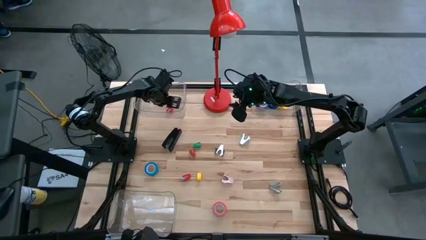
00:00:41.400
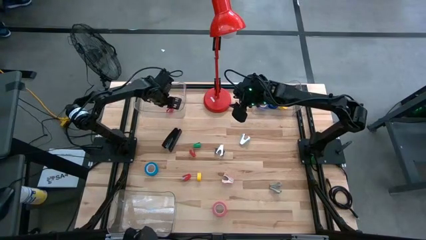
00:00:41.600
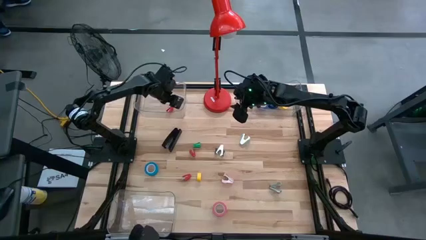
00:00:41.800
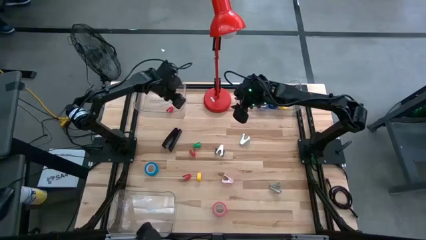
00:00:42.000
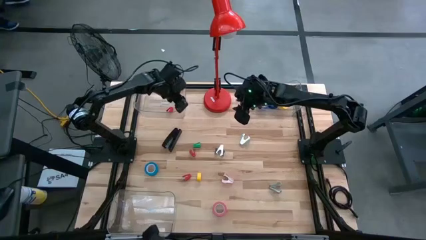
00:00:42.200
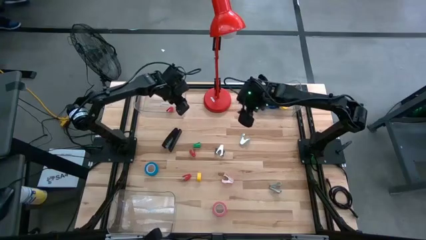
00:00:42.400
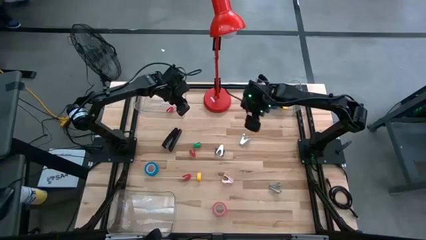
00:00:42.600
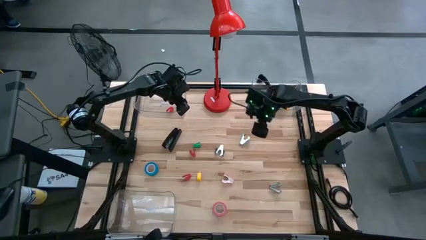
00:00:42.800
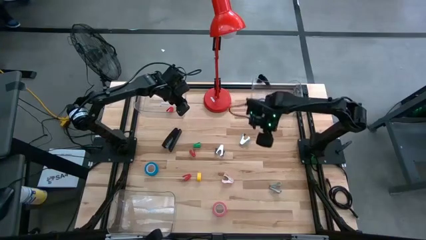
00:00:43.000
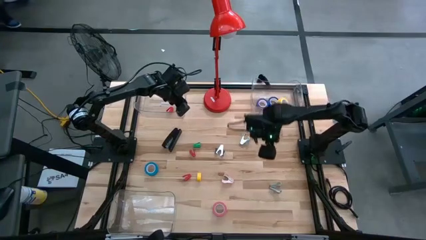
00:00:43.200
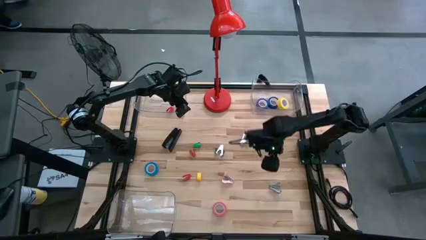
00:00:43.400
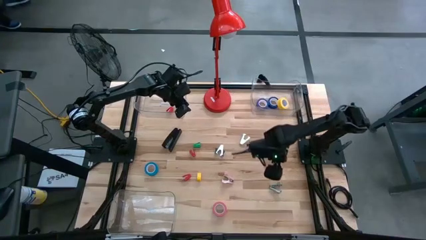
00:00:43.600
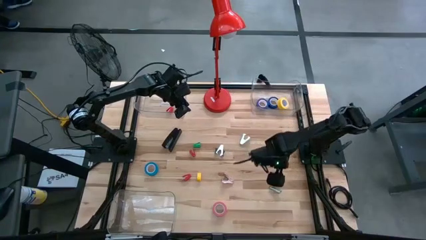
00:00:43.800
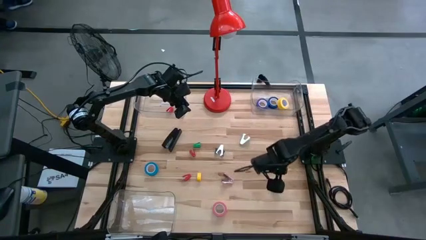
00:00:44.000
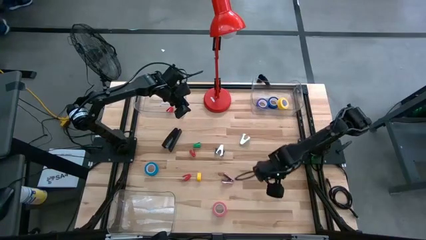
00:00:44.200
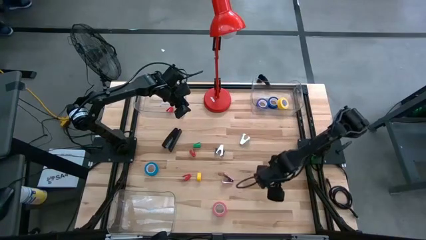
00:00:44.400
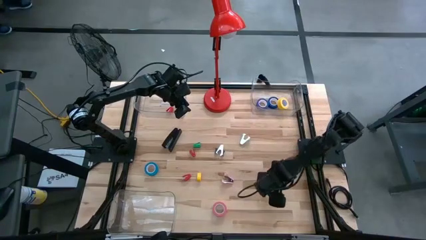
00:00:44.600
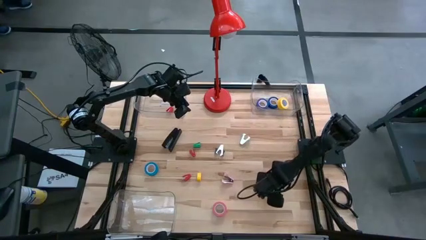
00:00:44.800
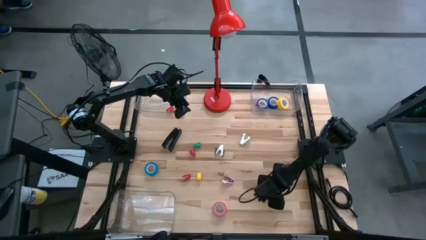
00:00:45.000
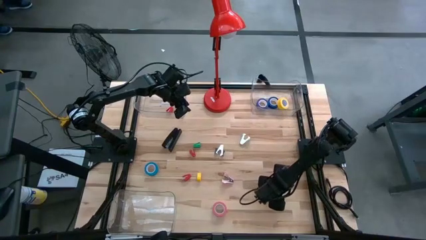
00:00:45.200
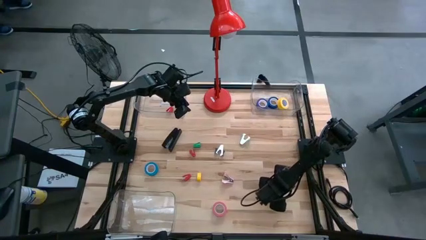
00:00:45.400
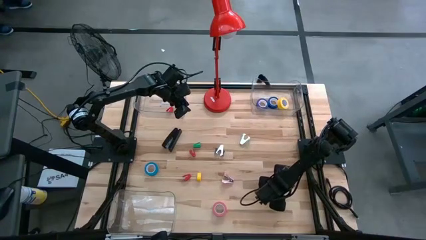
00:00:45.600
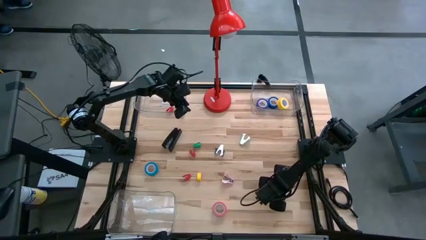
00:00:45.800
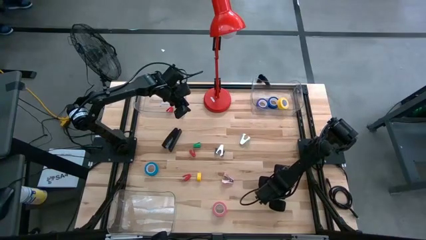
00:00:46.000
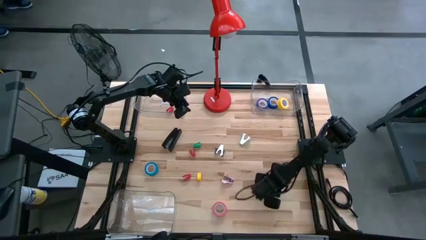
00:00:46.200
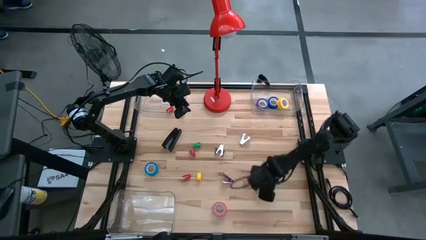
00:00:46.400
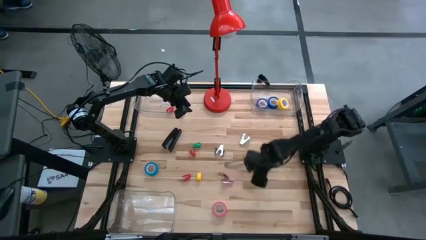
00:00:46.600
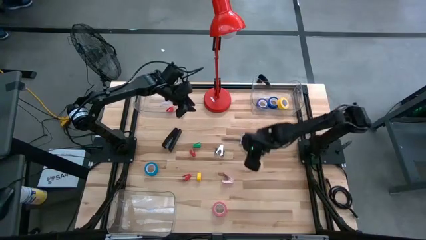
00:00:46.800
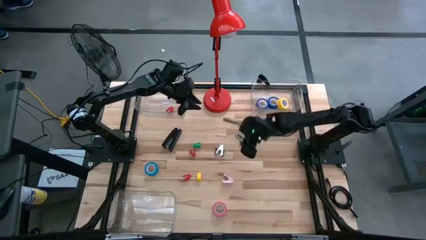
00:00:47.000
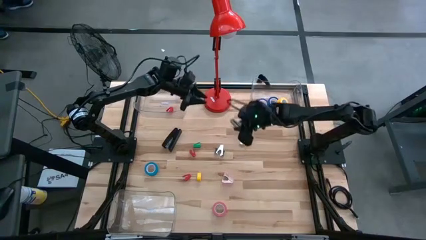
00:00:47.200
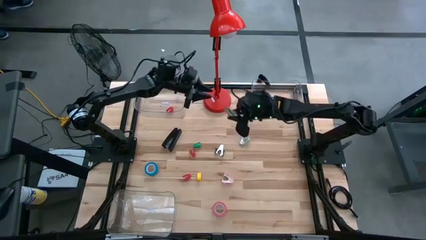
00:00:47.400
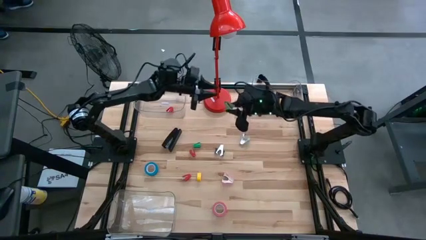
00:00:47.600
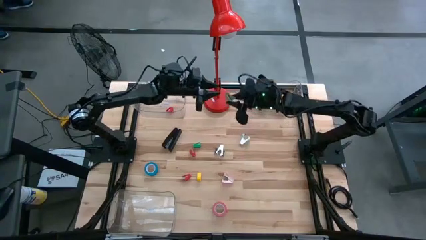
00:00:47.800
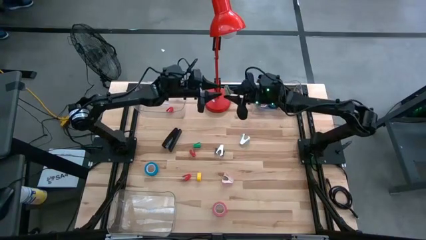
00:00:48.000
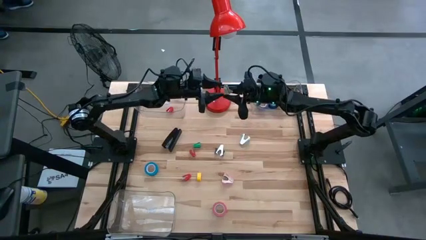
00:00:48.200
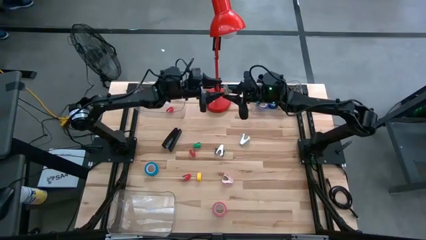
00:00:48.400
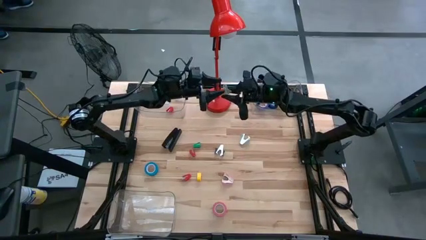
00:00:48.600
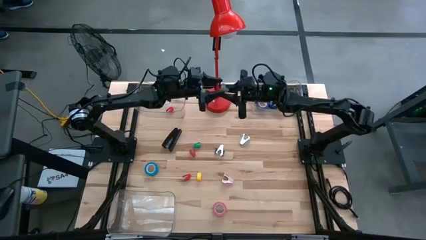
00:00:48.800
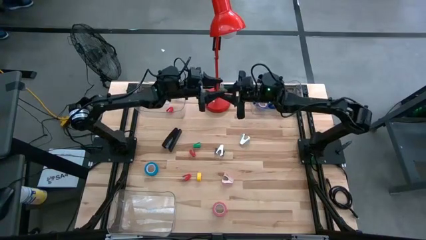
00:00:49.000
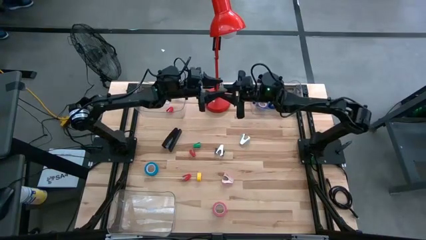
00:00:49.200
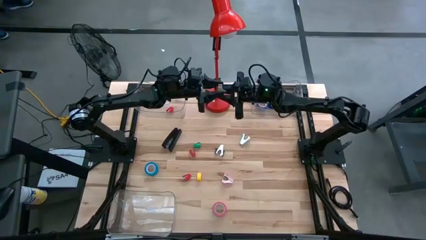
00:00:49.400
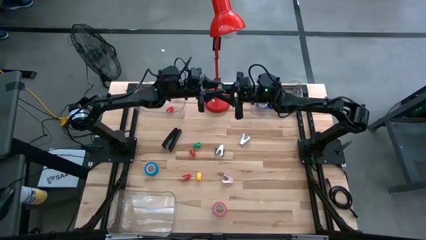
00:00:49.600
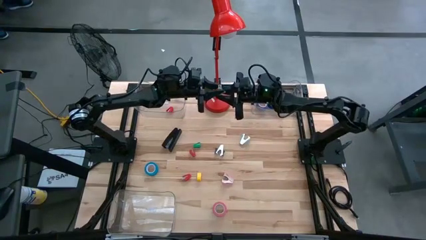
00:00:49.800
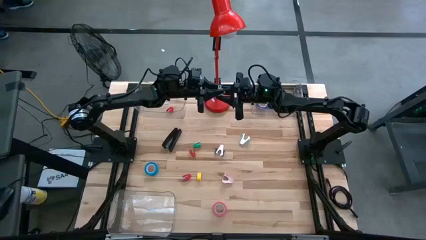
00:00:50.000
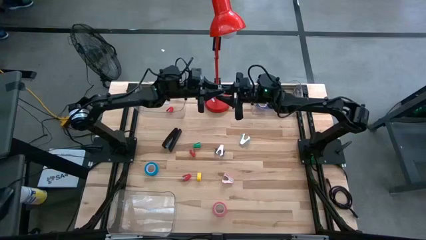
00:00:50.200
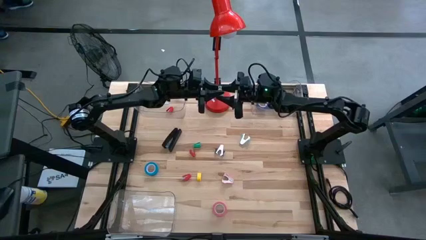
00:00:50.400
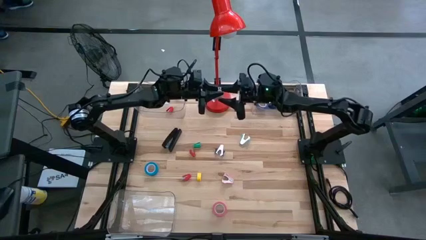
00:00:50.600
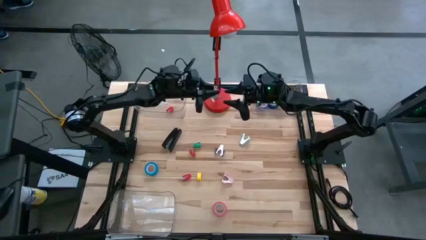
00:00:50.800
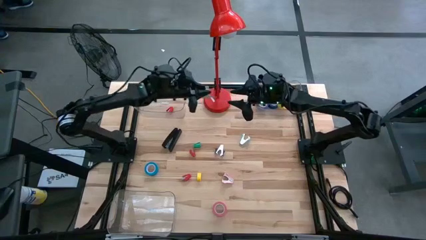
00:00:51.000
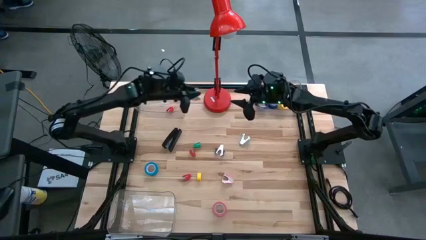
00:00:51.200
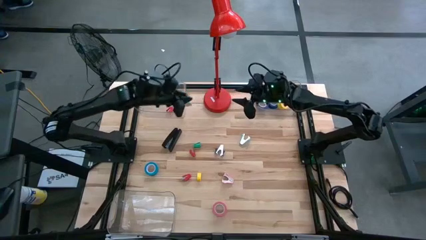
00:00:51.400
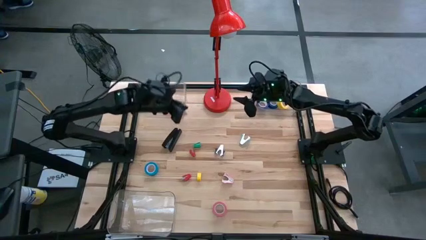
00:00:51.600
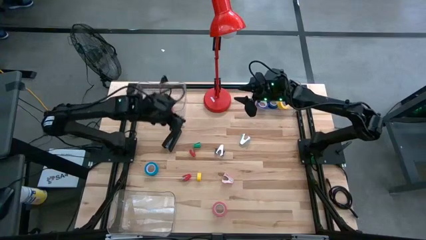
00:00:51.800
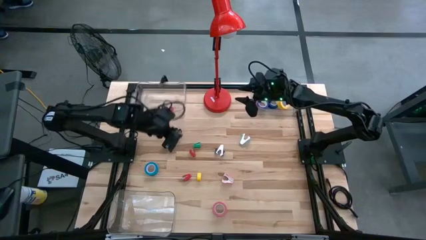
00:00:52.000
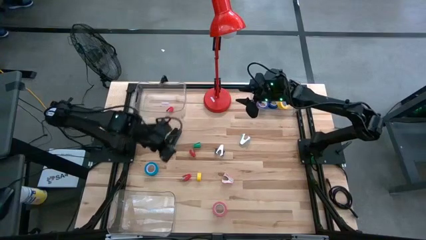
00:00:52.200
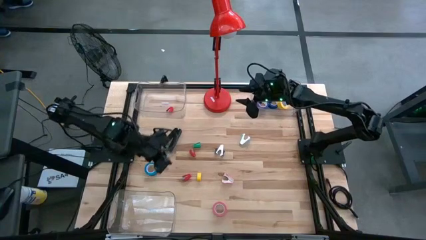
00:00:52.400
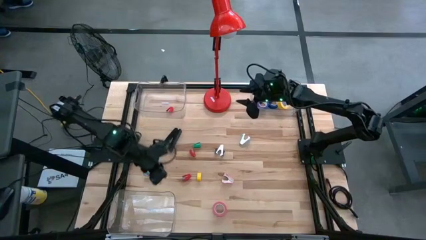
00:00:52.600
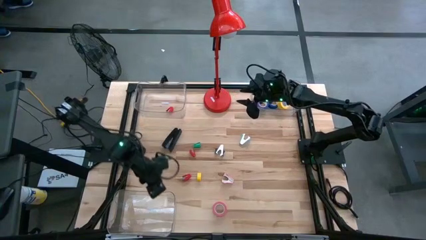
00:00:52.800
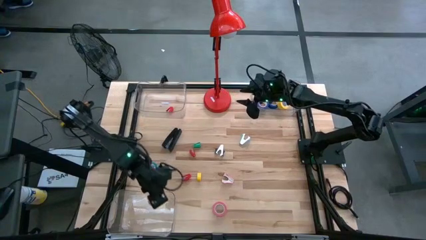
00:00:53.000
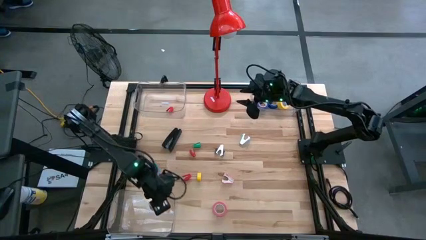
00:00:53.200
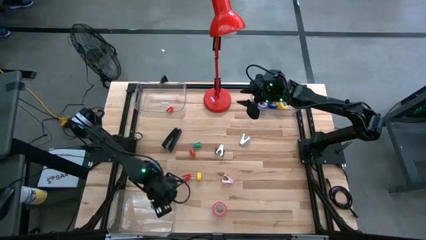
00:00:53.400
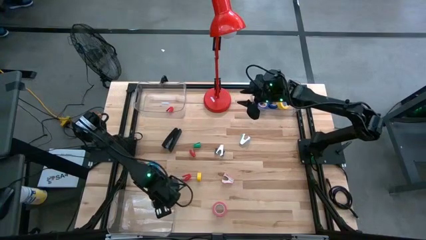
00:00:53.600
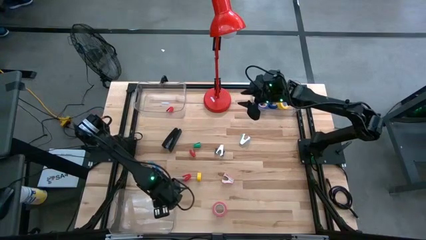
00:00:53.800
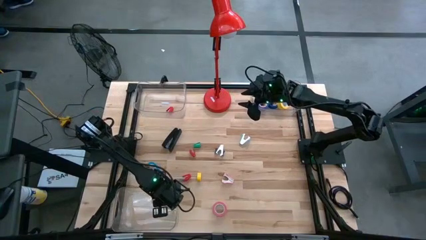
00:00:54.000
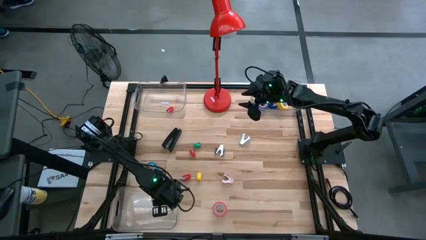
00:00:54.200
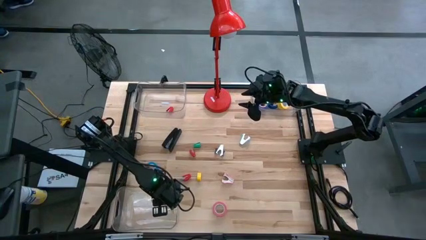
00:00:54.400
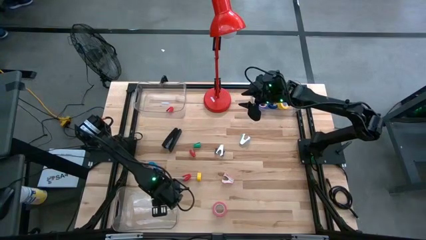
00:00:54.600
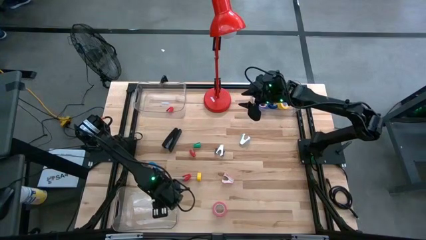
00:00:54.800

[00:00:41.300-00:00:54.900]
Task: Pick and place Stapler, Stapler remover, tape
Put the gray stapler remover into the bottom transparent bin
